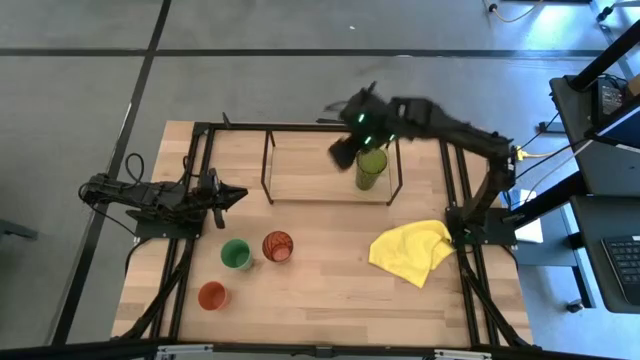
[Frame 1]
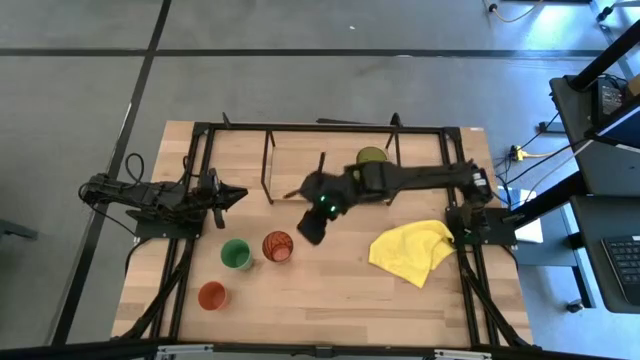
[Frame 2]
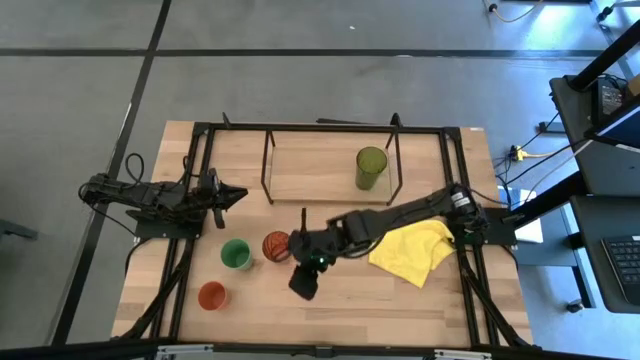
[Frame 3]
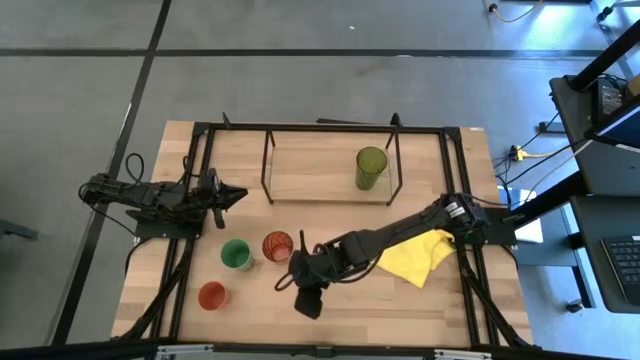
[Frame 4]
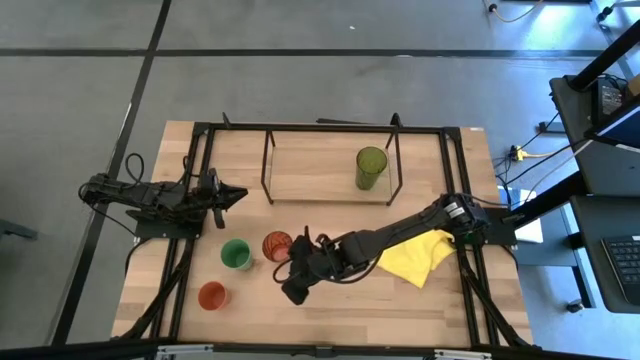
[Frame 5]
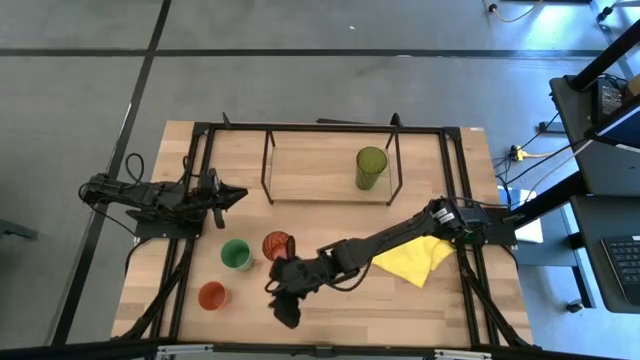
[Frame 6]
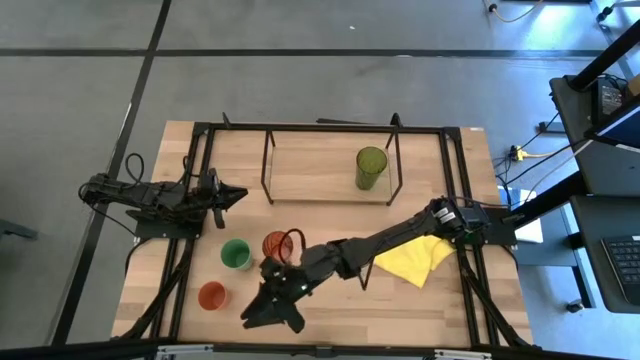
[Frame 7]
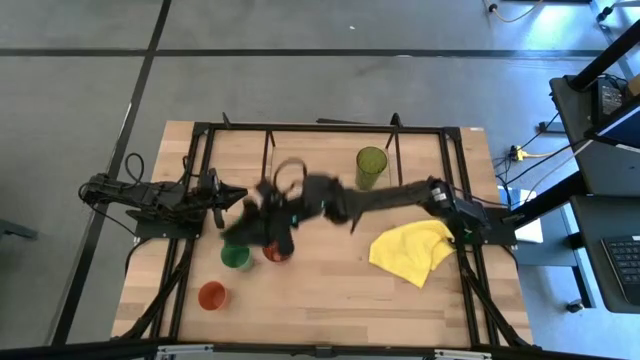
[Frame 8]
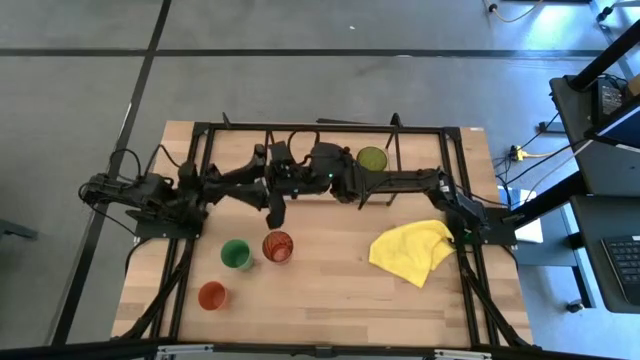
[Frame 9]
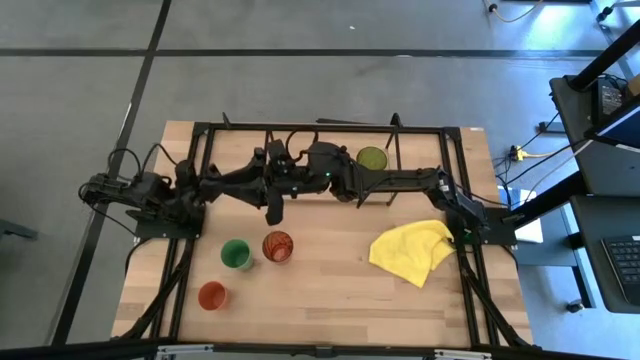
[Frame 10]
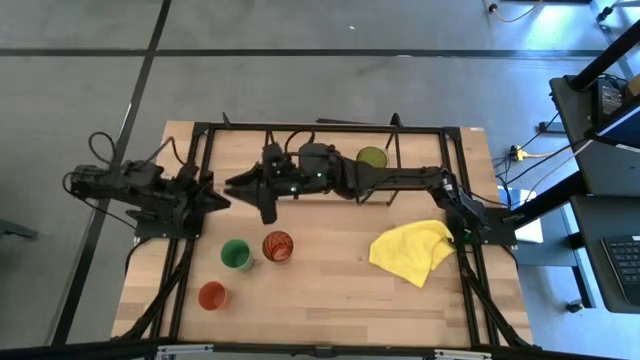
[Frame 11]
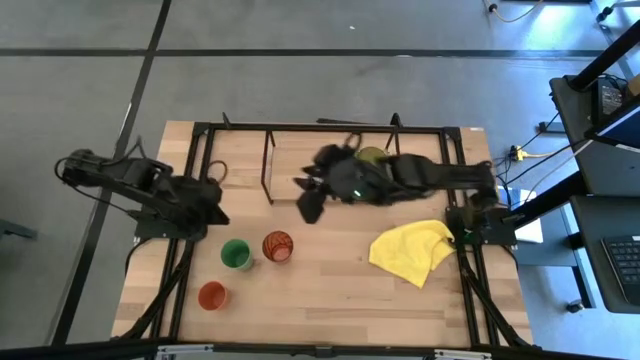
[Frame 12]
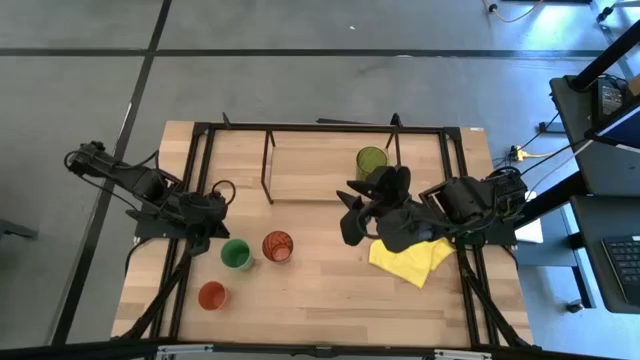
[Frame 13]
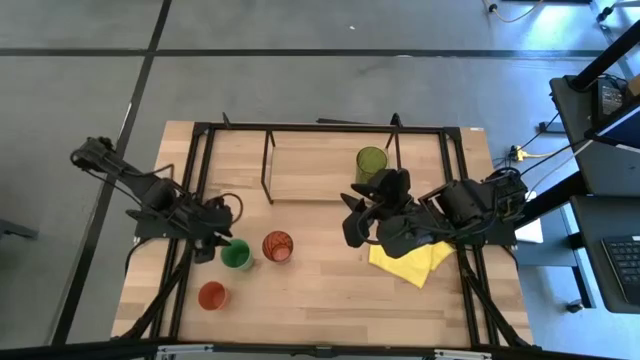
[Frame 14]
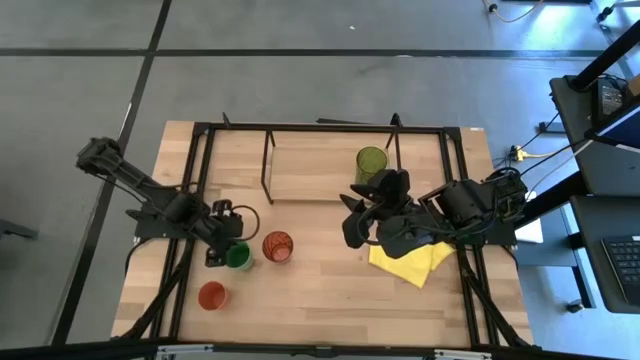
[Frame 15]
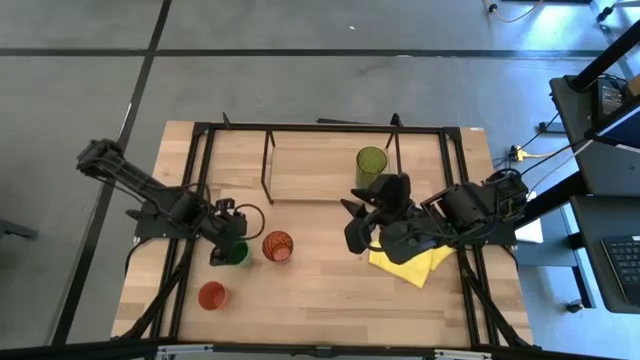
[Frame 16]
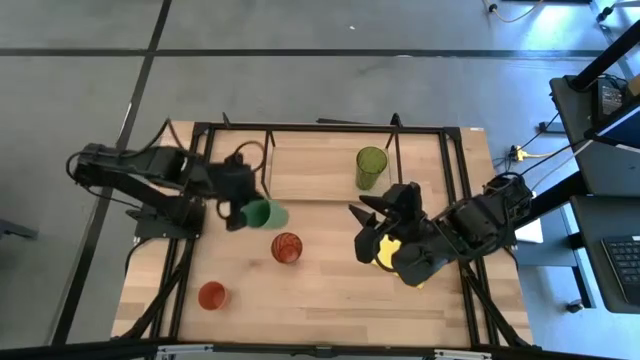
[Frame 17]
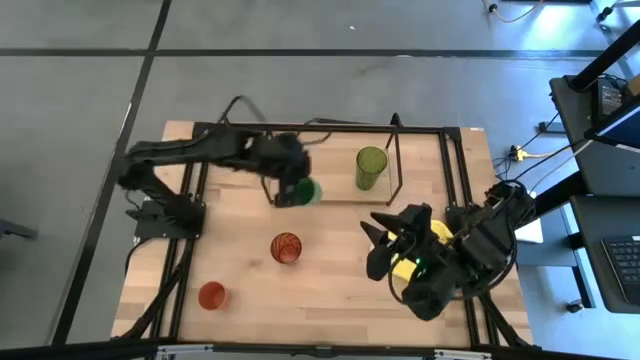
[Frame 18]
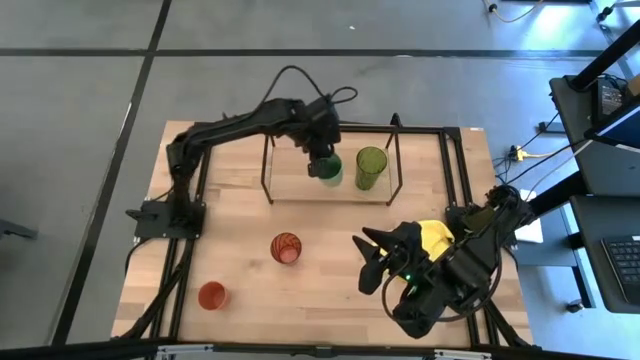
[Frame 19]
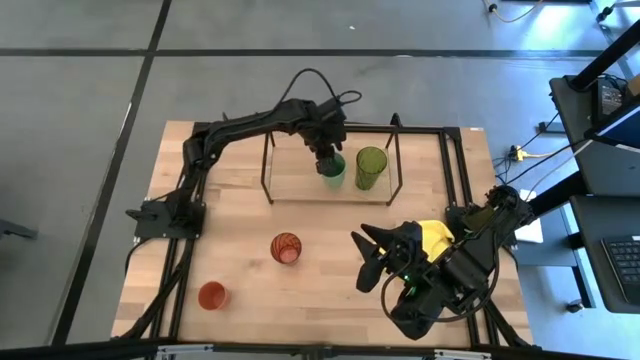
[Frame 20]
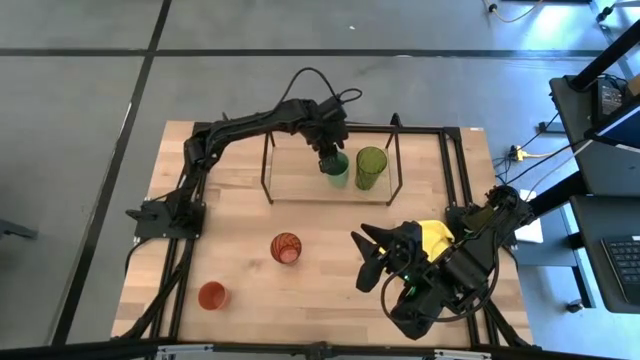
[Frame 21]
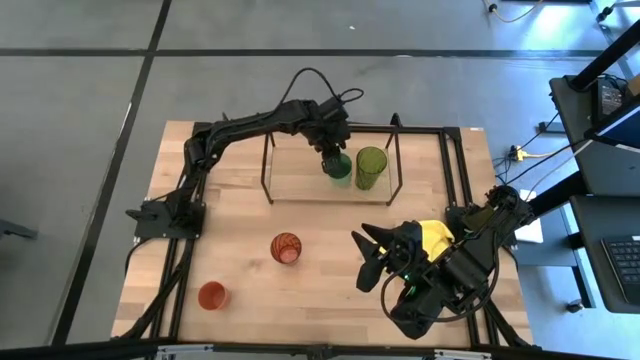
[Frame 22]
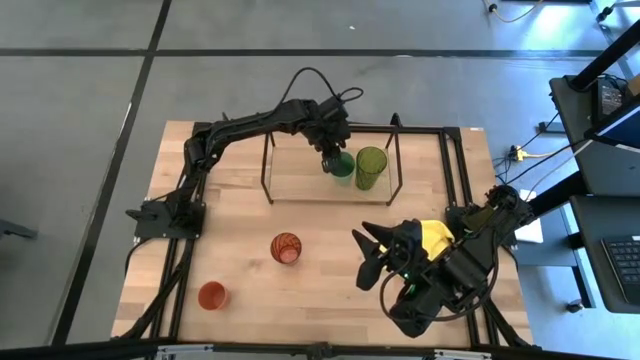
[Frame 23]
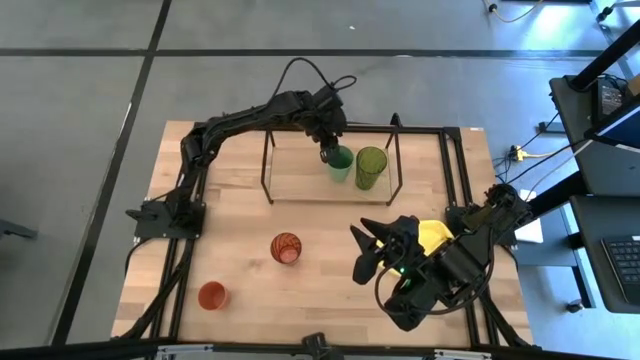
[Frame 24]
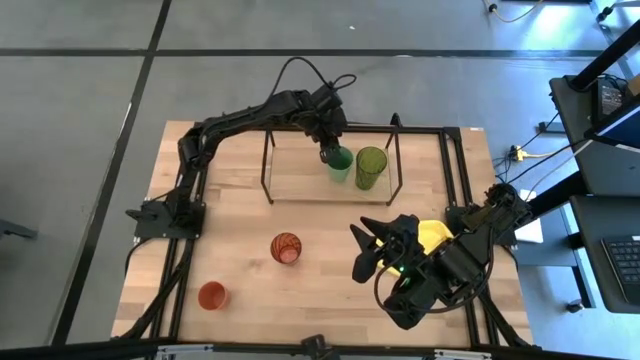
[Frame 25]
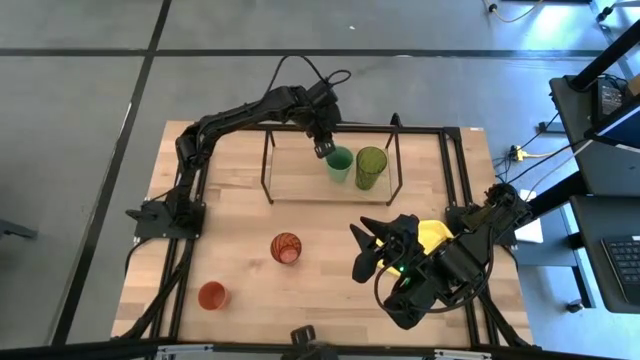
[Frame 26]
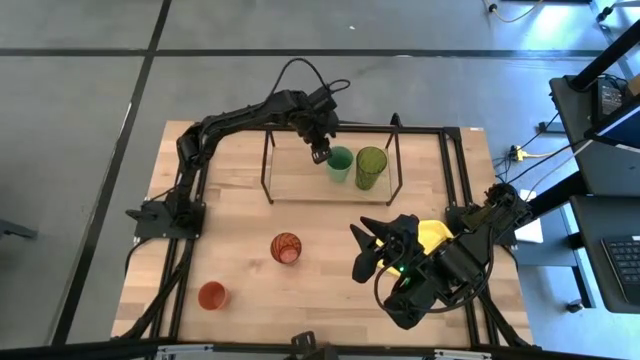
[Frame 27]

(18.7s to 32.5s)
Task: Stack small to large cups/mugs on shelf
Put the green cup on the shelf

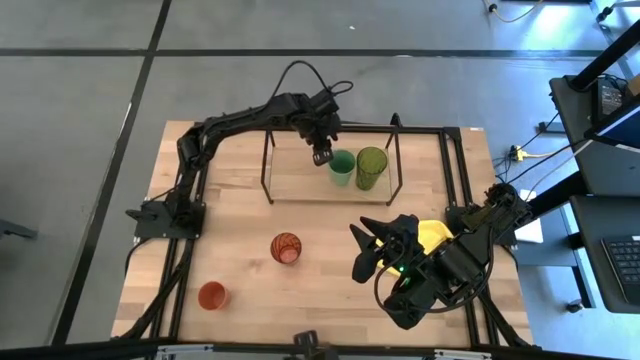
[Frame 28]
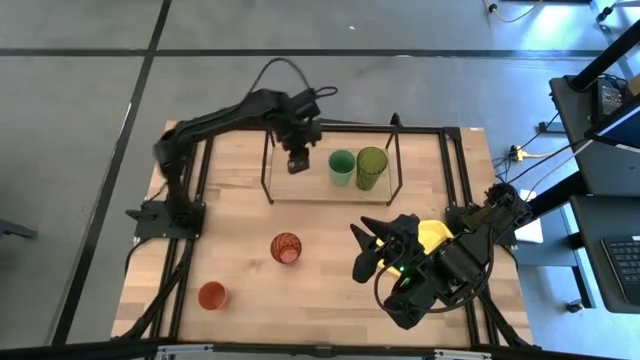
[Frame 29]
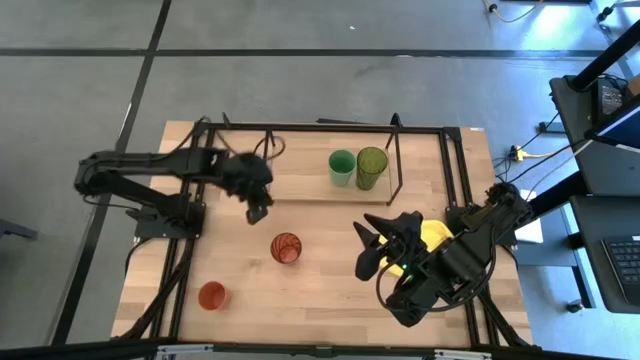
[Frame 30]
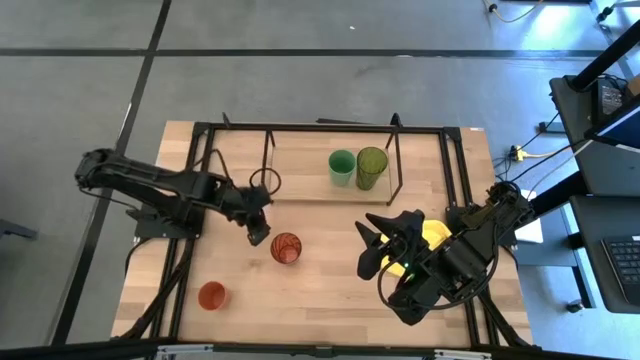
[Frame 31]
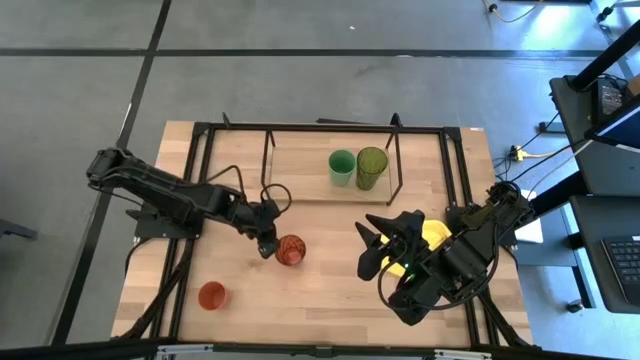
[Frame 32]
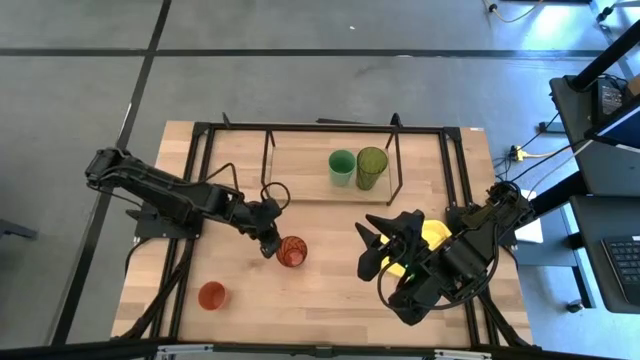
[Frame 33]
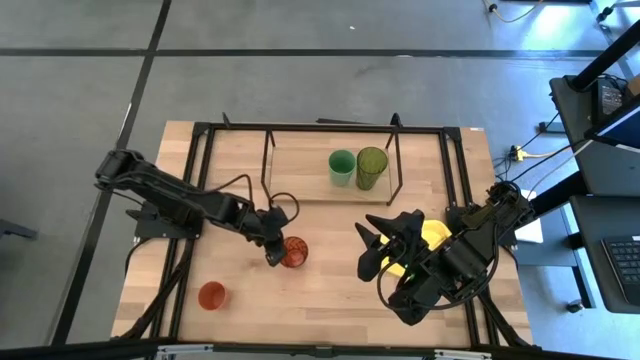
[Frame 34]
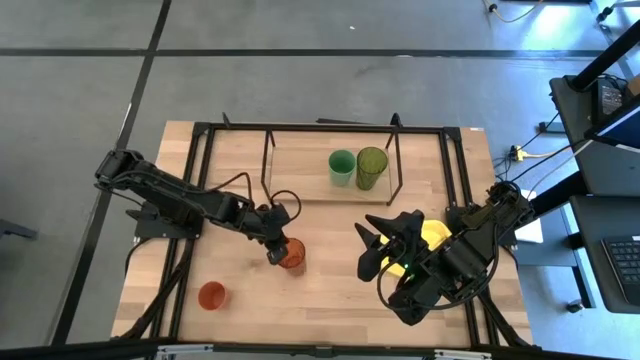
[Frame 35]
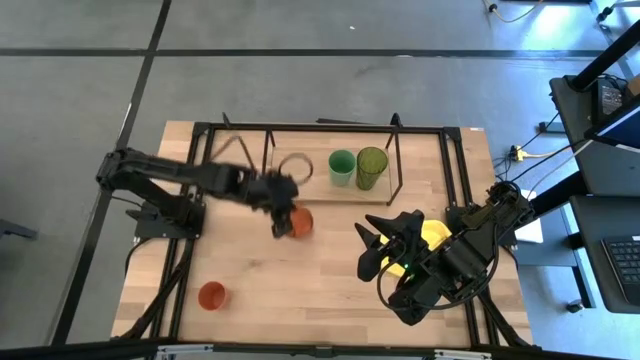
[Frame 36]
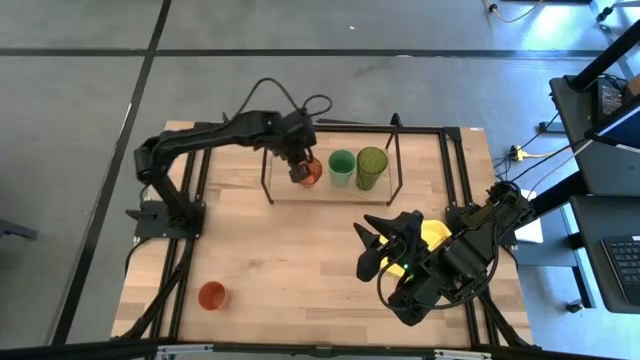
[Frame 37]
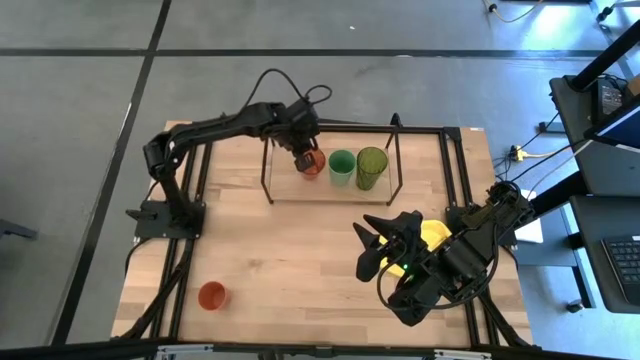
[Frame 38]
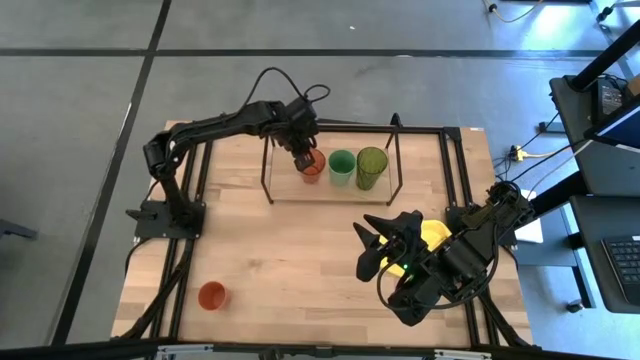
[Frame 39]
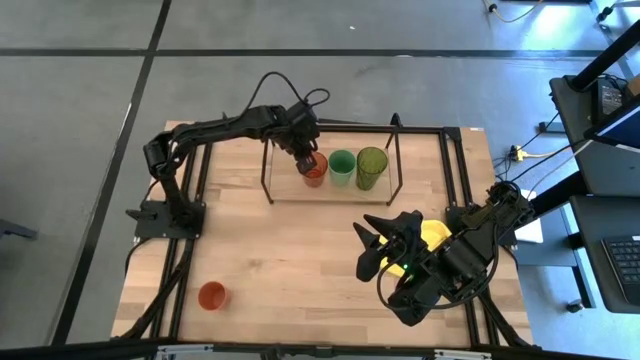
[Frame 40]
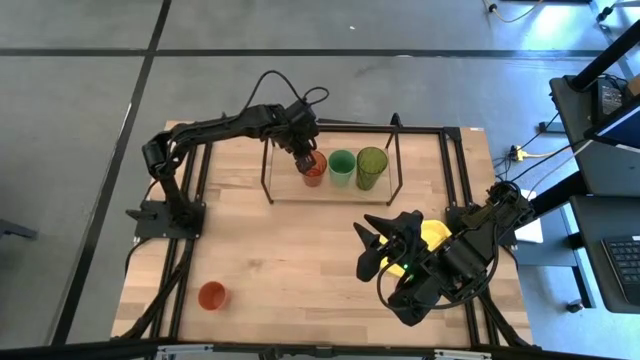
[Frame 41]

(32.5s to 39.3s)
Put the light orange cup on the shelf
